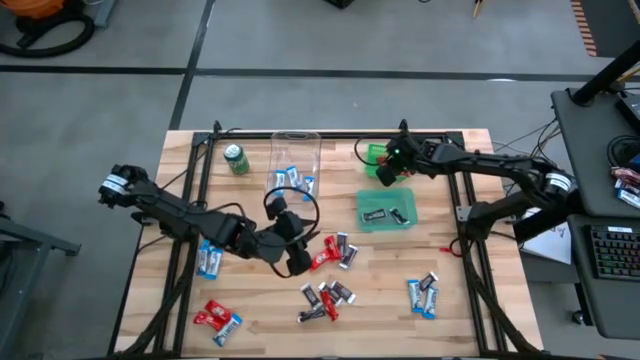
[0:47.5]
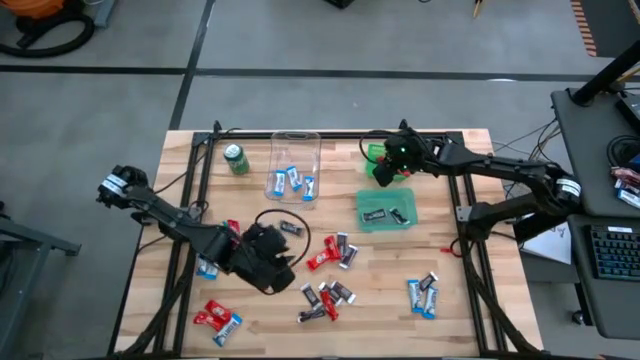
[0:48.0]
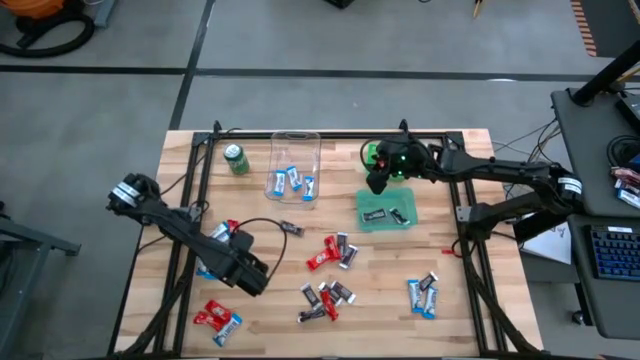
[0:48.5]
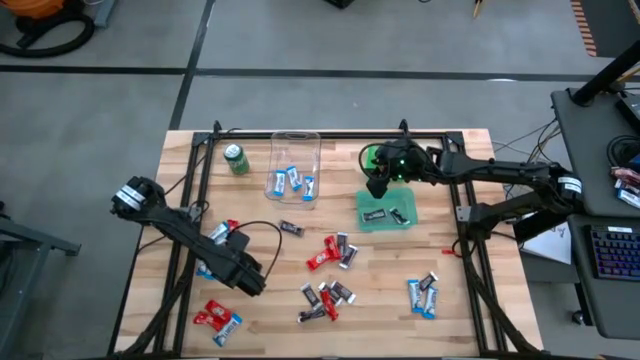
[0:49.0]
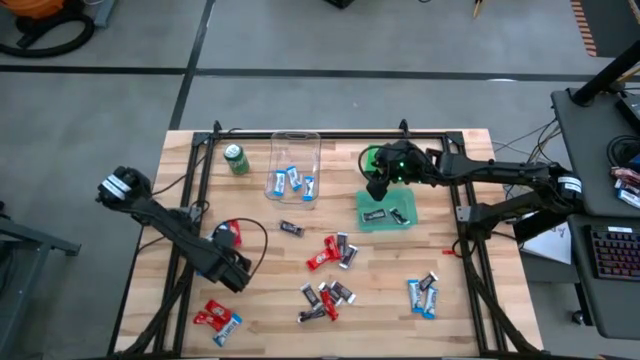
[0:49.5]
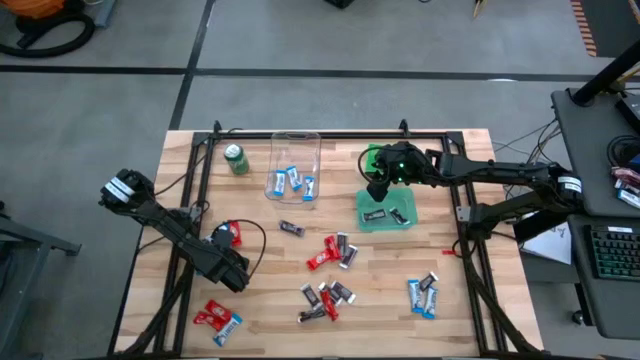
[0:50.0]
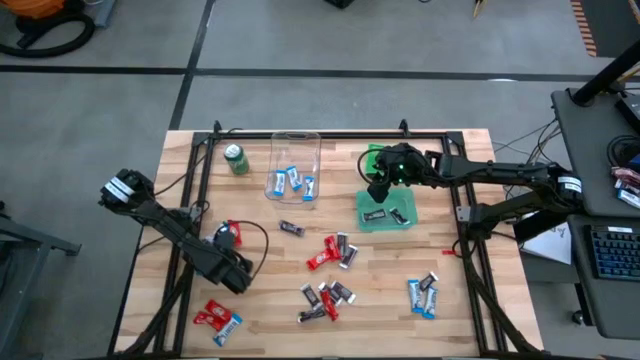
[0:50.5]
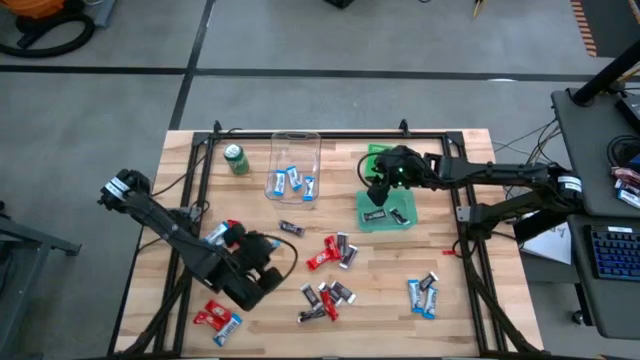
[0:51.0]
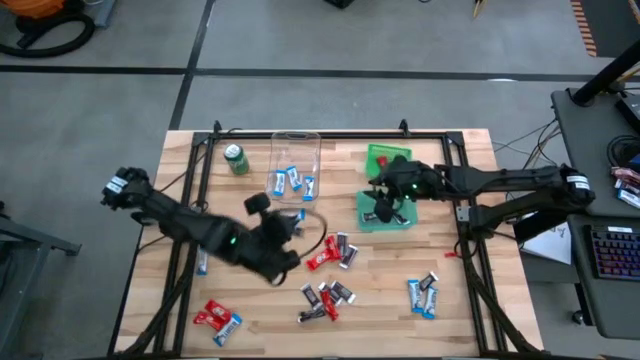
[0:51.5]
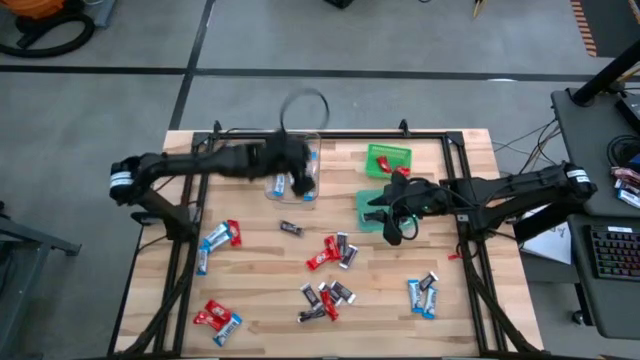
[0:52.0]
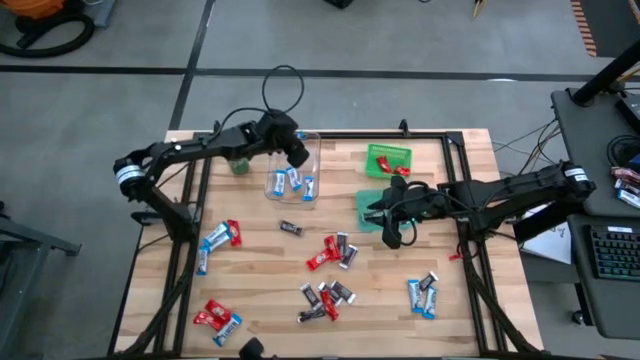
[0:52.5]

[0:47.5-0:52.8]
Task: Sort candy
Put the white candy into the transparent bin

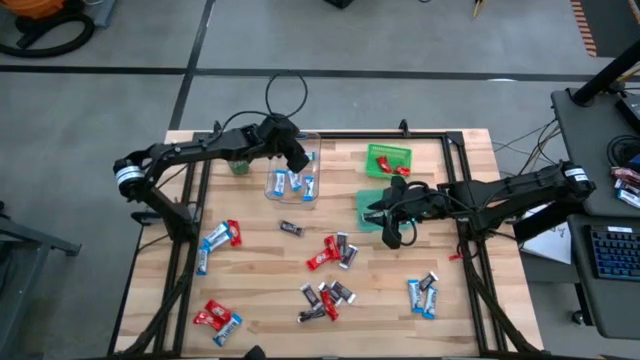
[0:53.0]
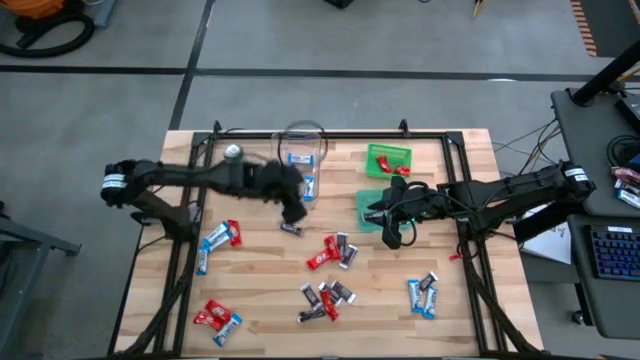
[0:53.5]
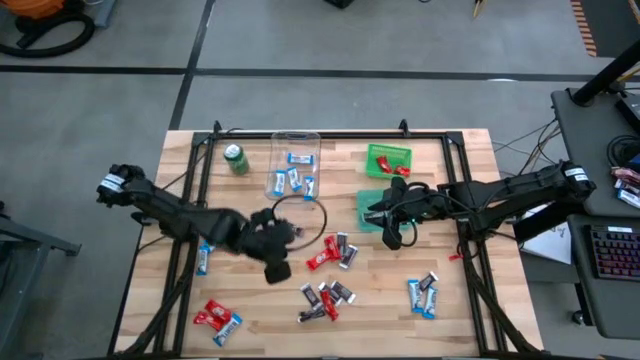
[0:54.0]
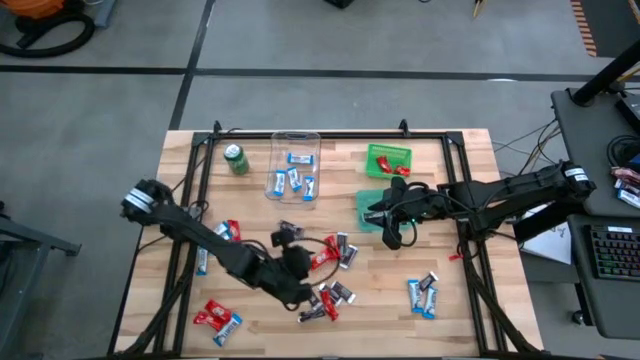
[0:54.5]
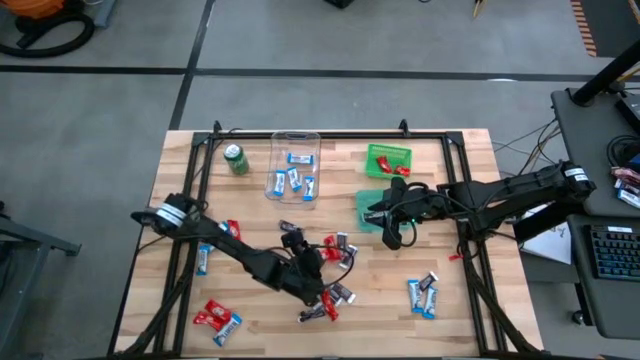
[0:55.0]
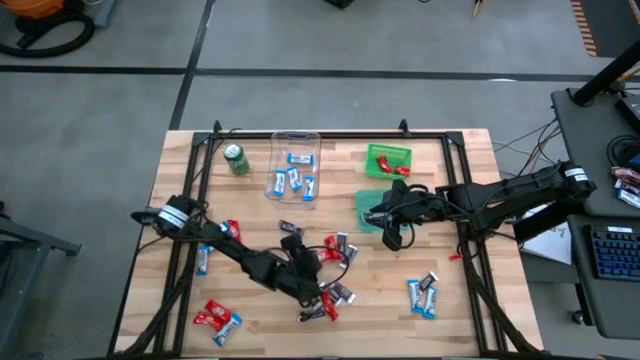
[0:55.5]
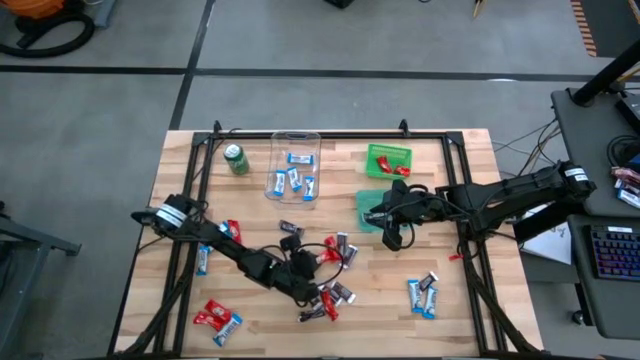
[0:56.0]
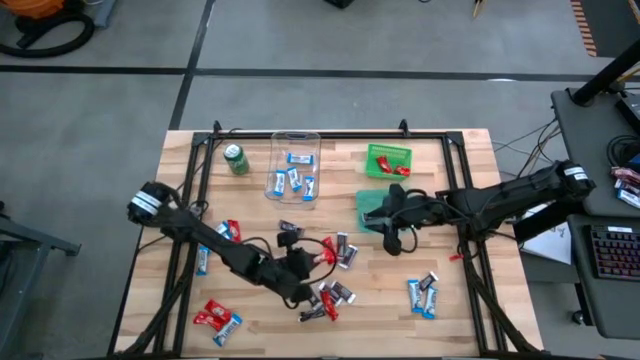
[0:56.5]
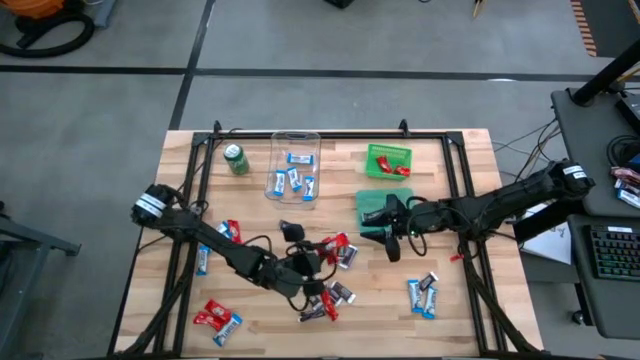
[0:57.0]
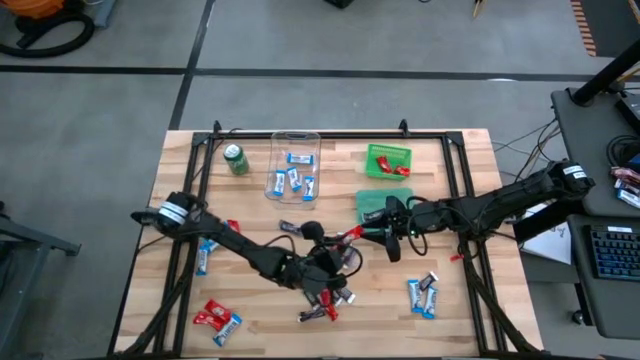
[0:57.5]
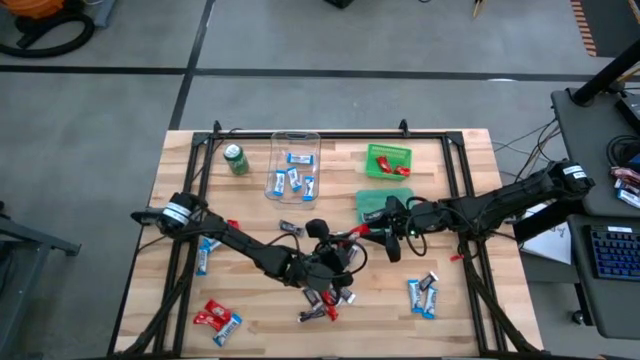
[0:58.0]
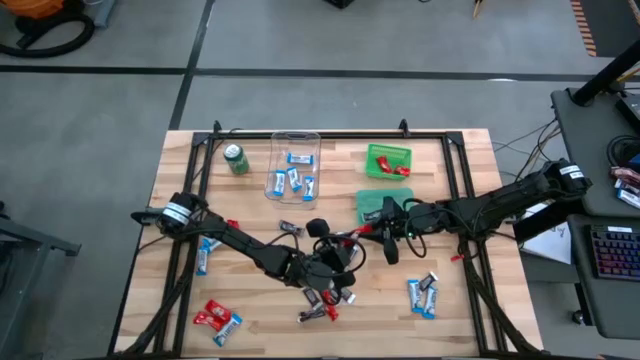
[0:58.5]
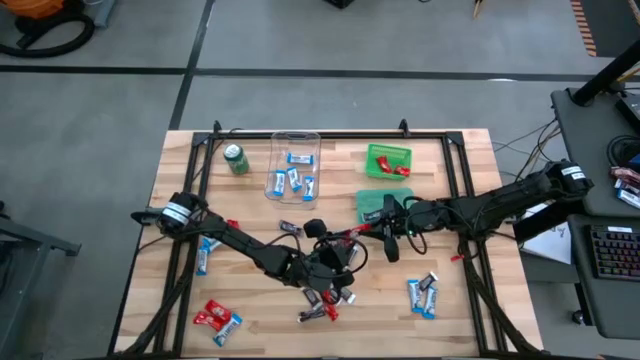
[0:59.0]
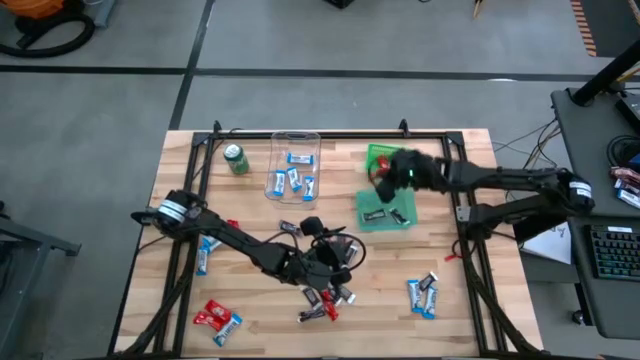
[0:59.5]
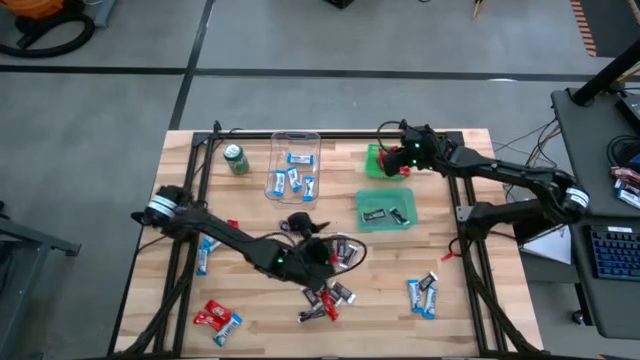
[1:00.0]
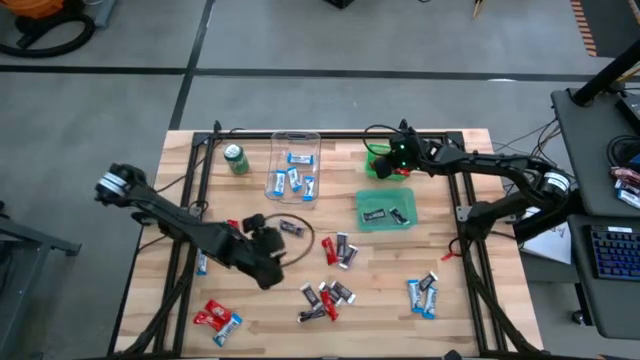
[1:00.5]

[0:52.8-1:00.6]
Put the red candy into the green bin

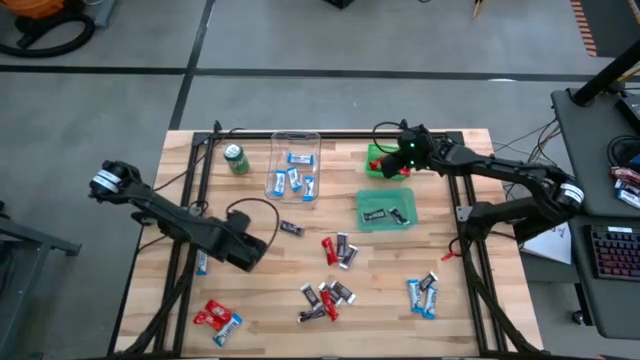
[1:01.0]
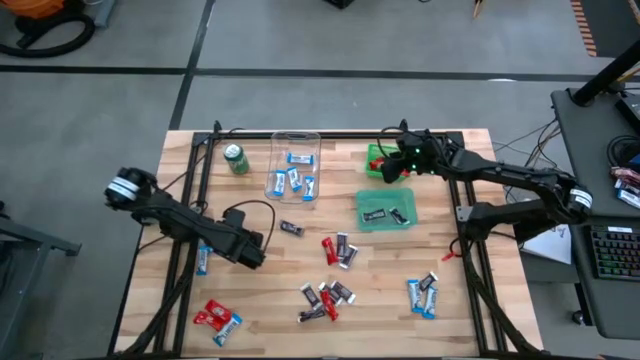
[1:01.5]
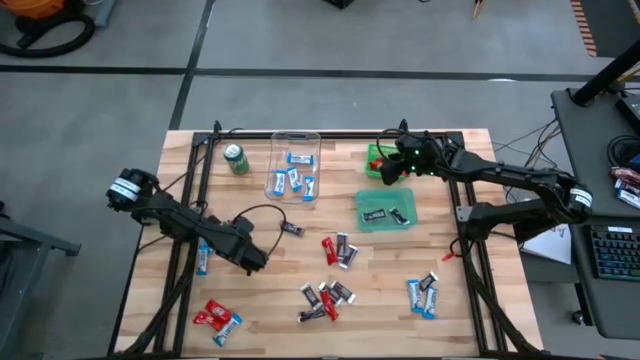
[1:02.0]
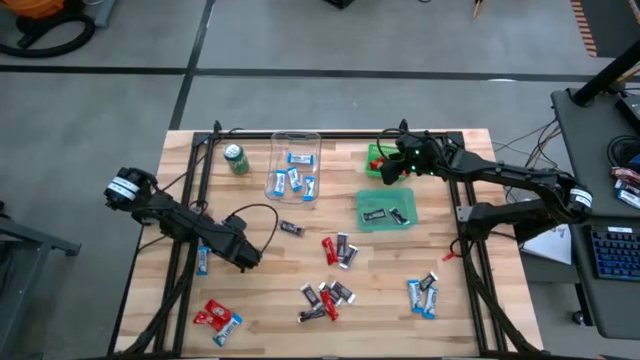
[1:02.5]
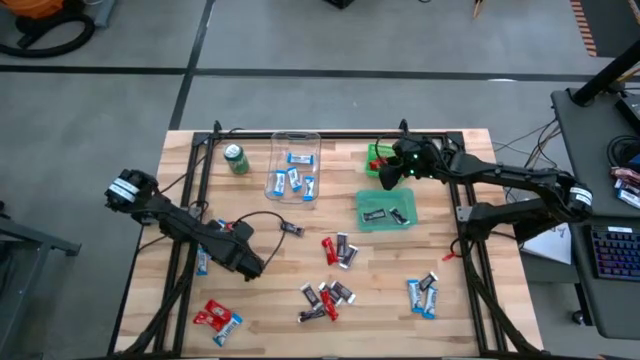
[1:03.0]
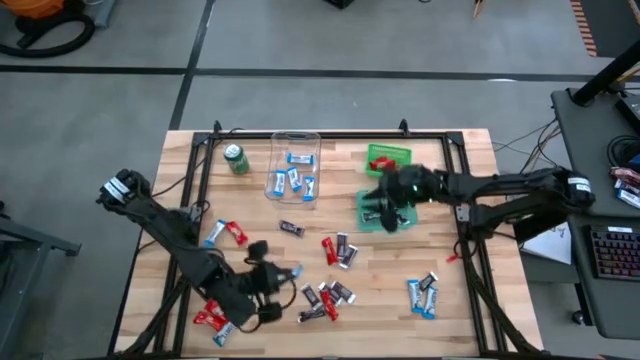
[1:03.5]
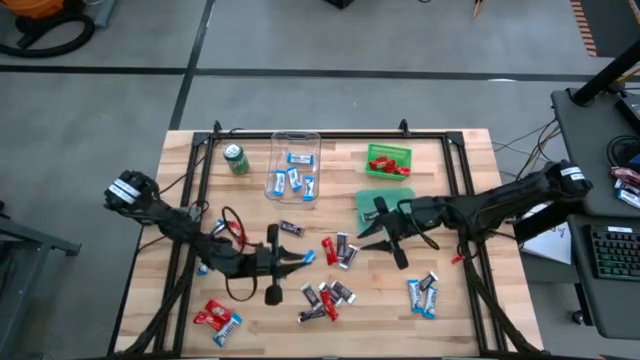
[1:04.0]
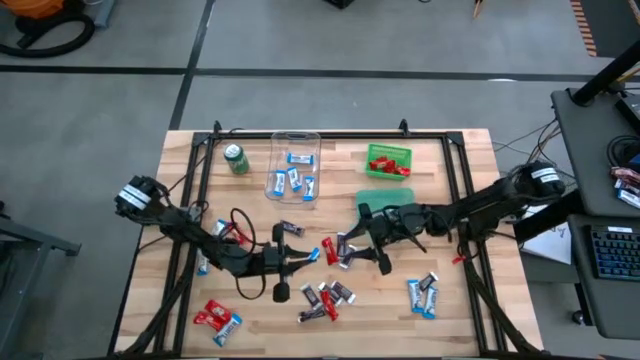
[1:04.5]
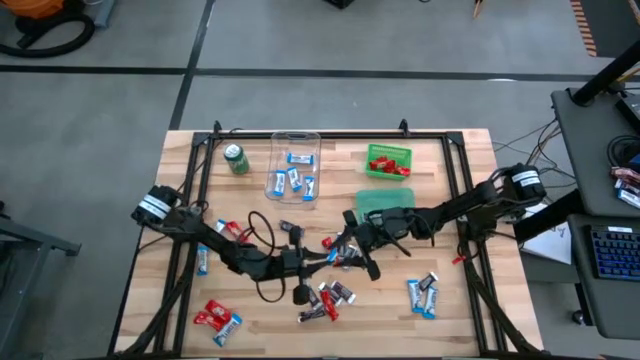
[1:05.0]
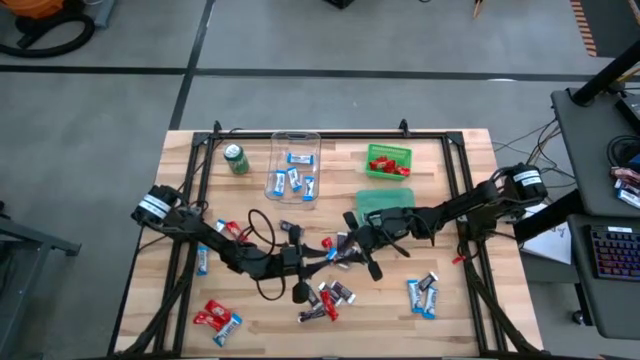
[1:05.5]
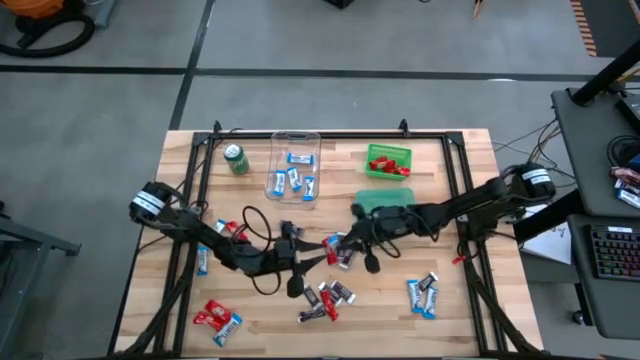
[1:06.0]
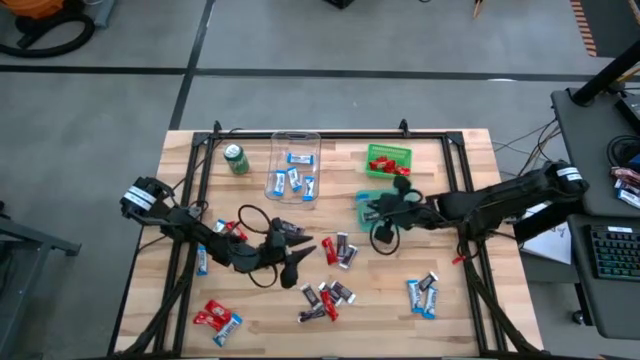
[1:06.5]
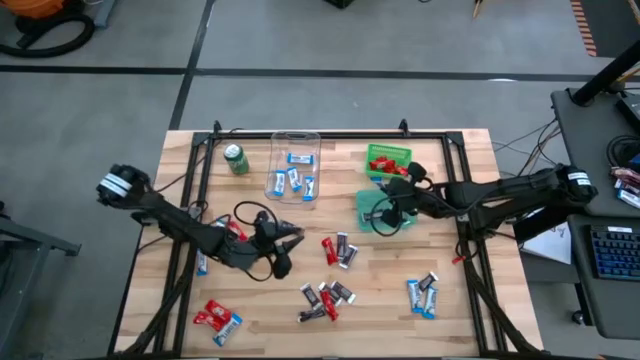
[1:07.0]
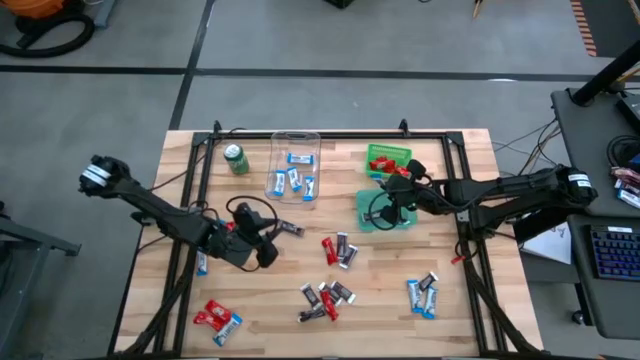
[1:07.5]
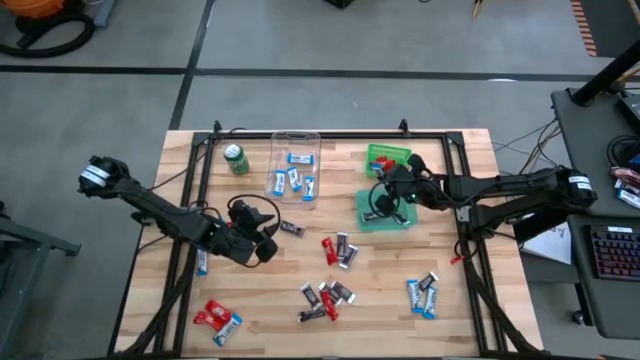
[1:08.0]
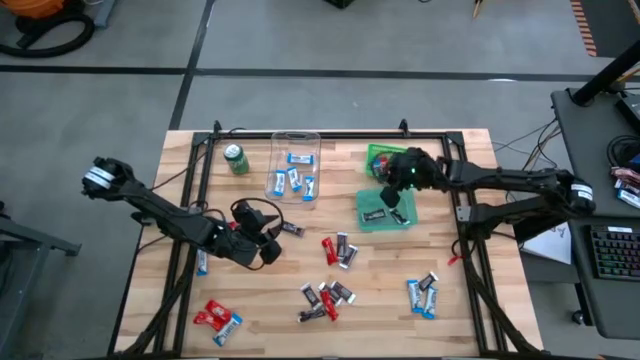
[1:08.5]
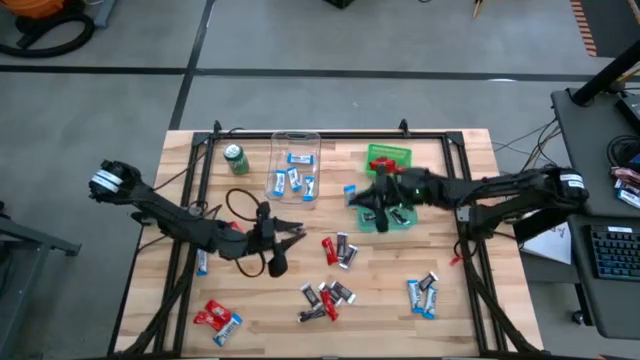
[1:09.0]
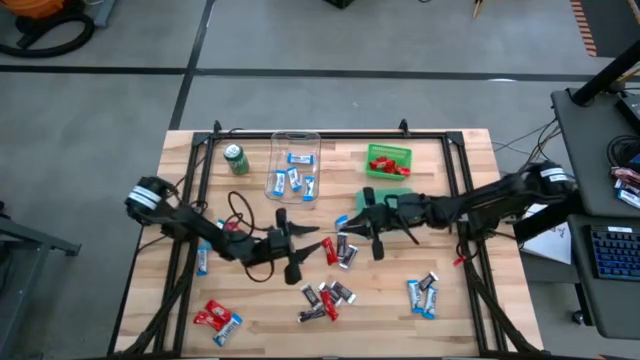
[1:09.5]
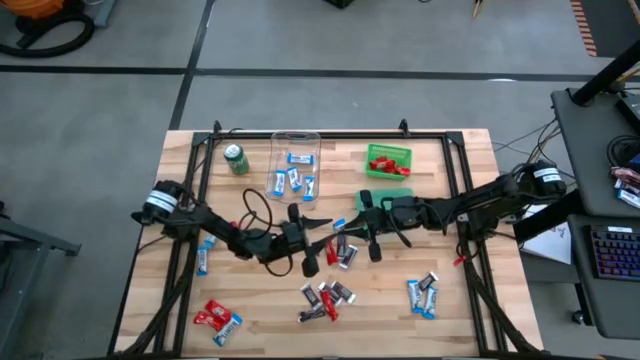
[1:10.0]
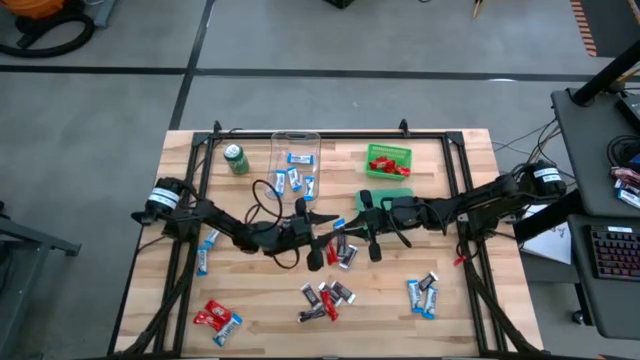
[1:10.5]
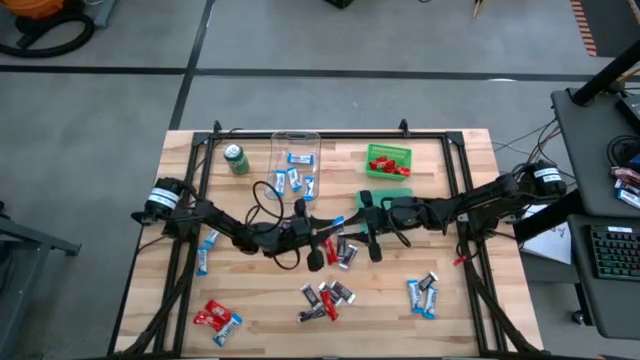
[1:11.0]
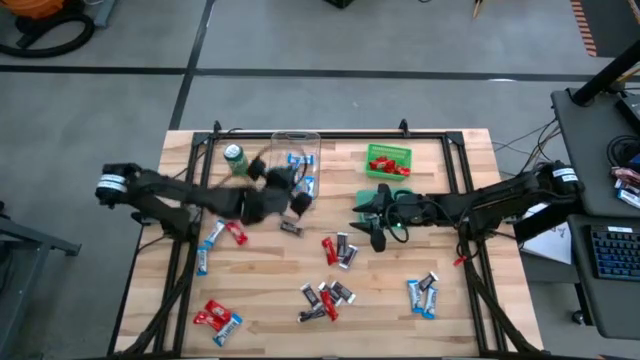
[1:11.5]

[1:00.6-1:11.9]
Put the white candy into the transparent bin
